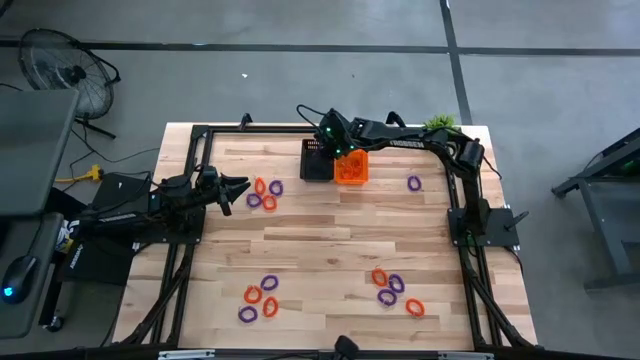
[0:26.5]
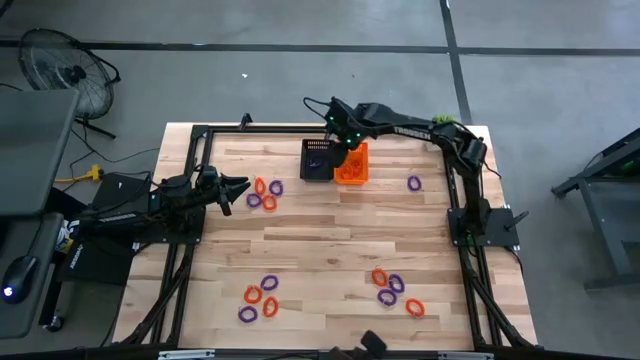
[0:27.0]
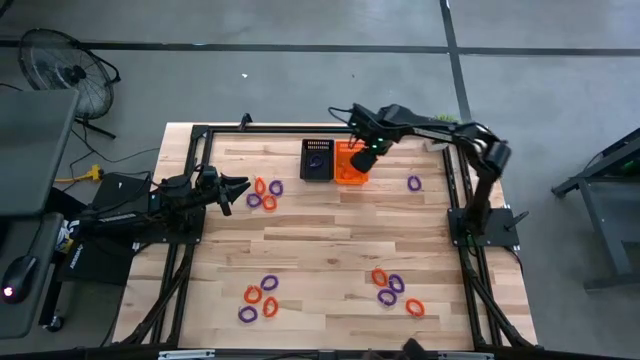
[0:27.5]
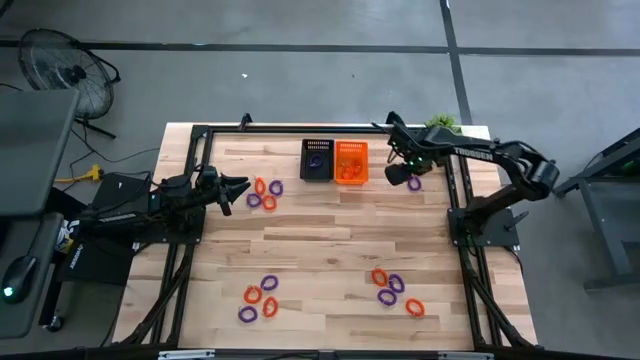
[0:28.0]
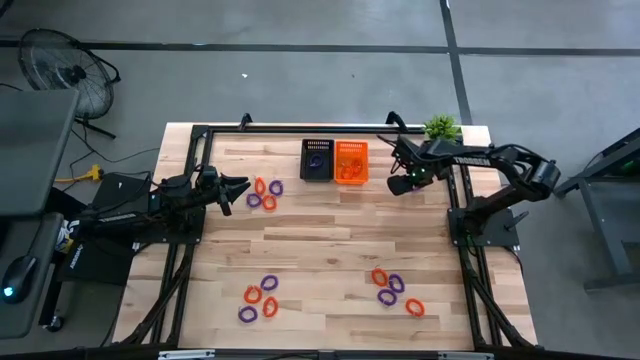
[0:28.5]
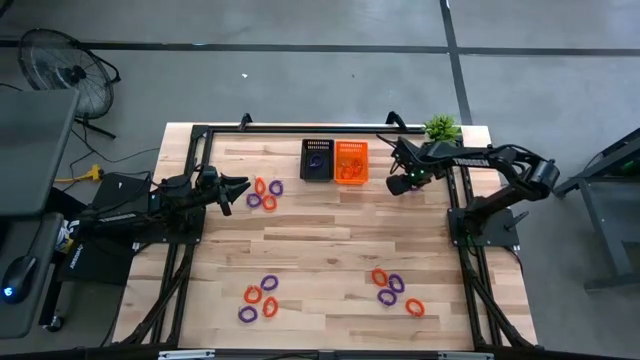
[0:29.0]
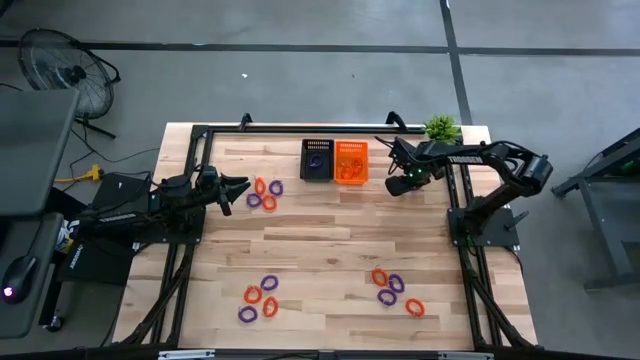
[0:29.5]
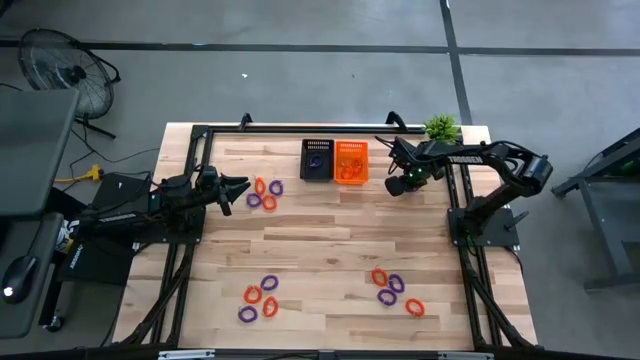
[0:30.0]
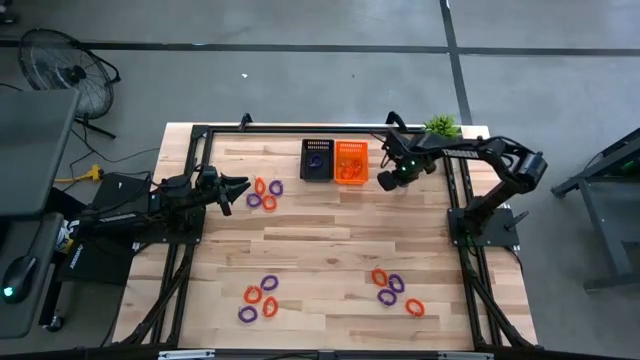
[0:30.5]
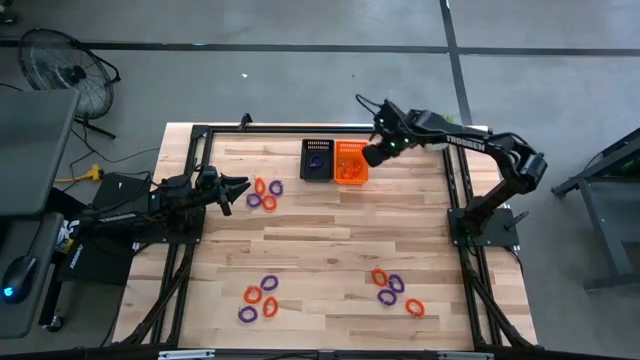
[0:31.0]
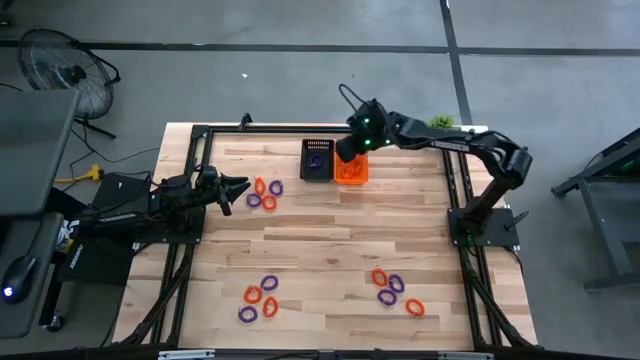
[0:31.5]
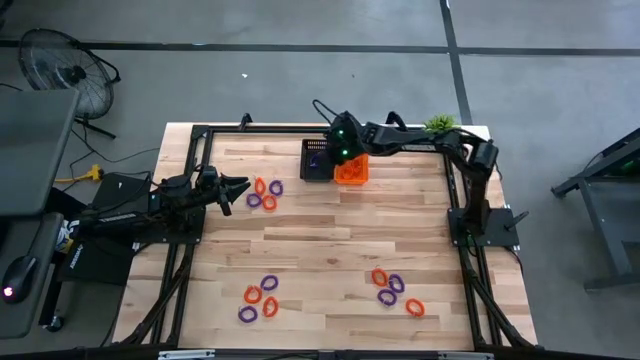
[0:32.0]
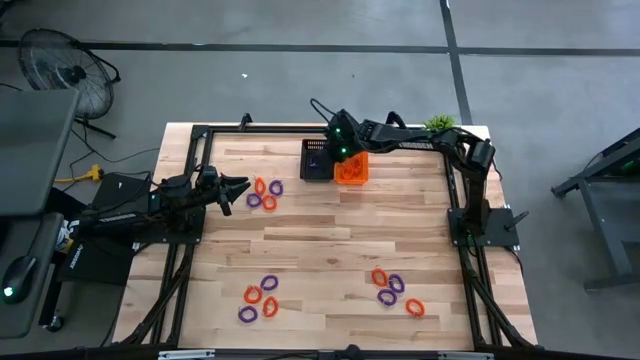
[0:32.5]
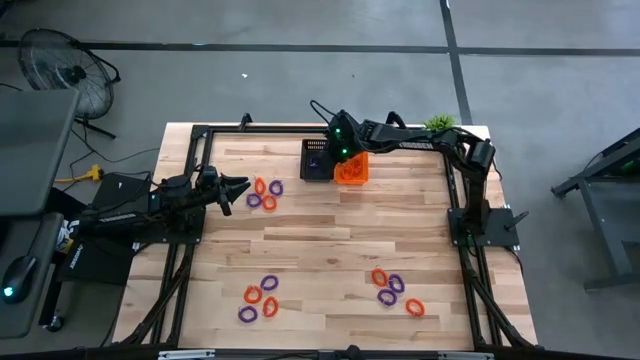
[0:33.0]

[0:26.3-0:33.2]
Task: Sort spring keychains
Put the purple spring keychain in the black bin

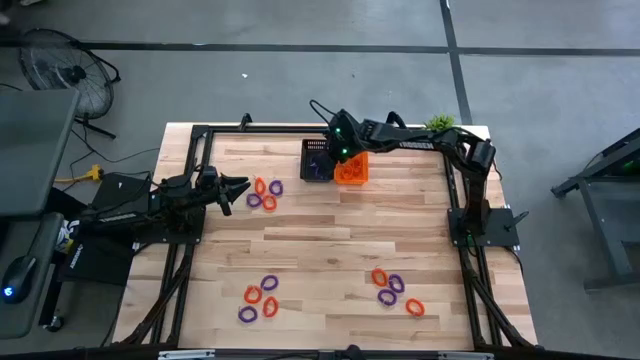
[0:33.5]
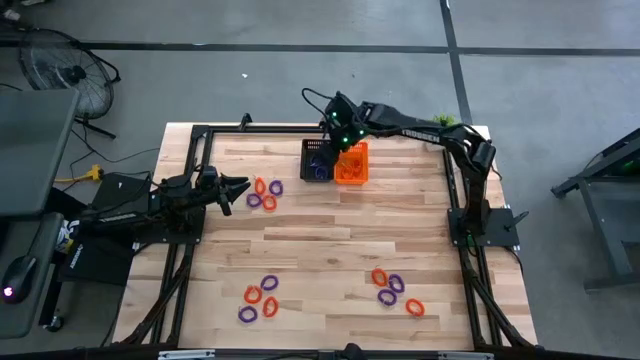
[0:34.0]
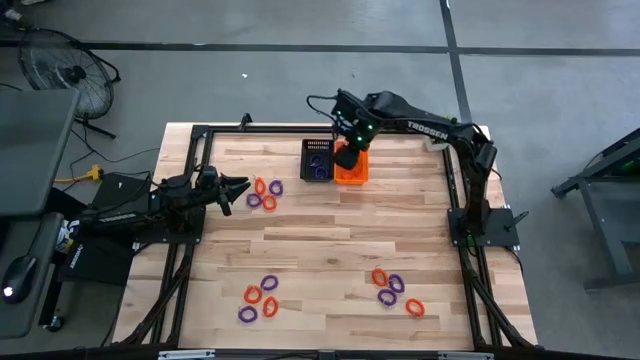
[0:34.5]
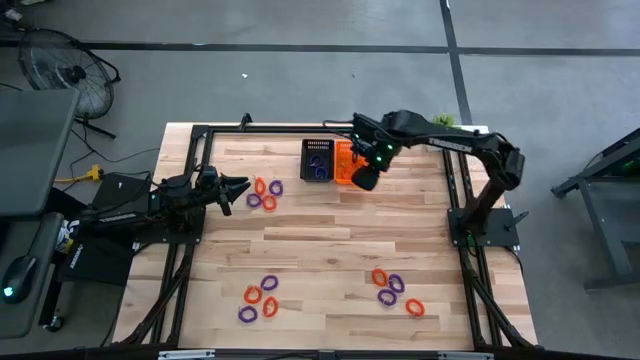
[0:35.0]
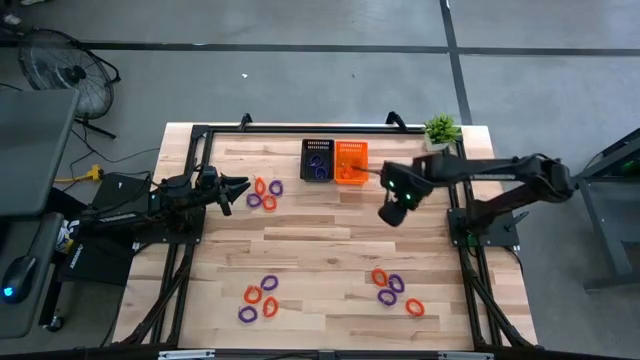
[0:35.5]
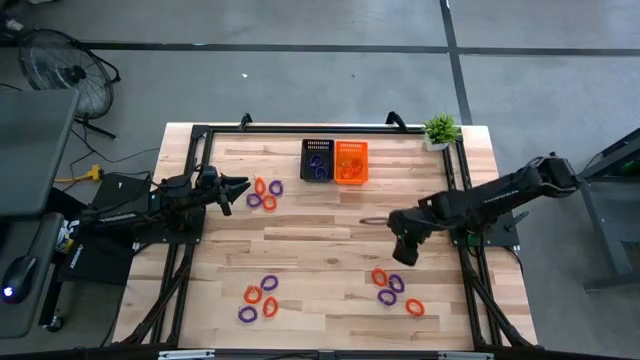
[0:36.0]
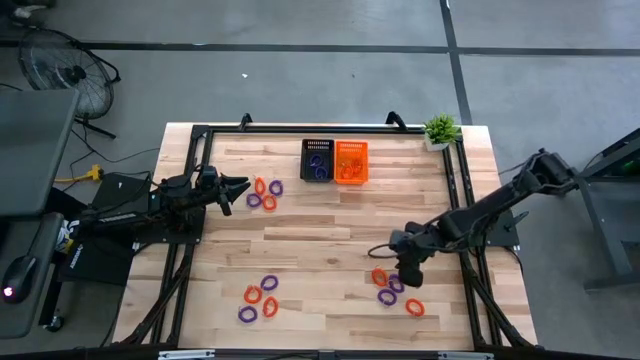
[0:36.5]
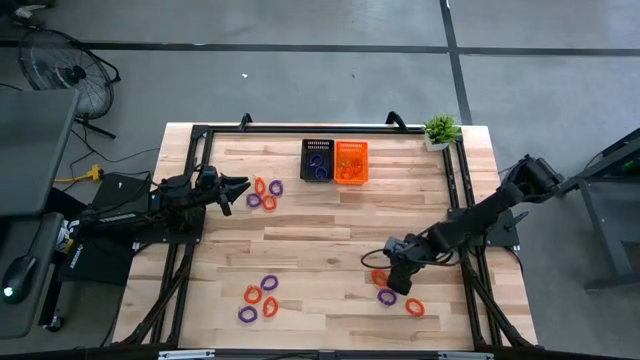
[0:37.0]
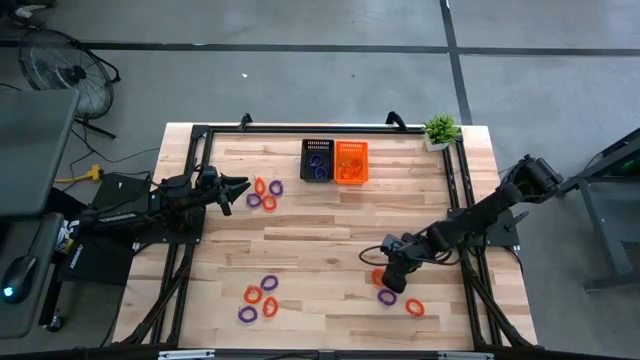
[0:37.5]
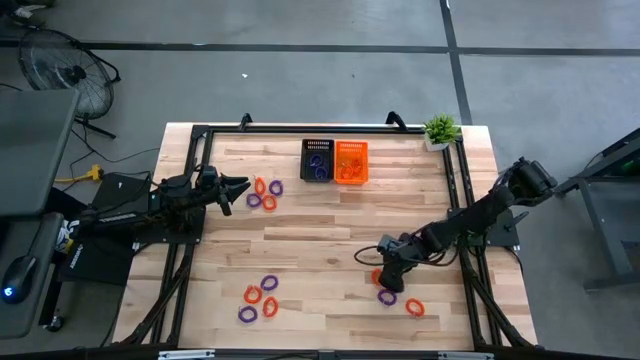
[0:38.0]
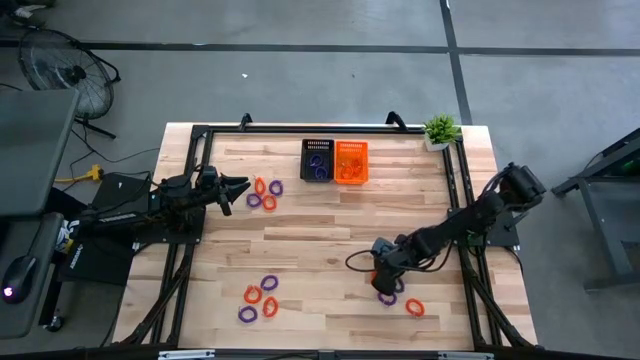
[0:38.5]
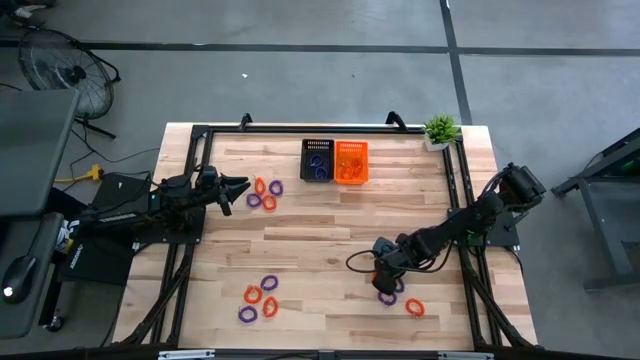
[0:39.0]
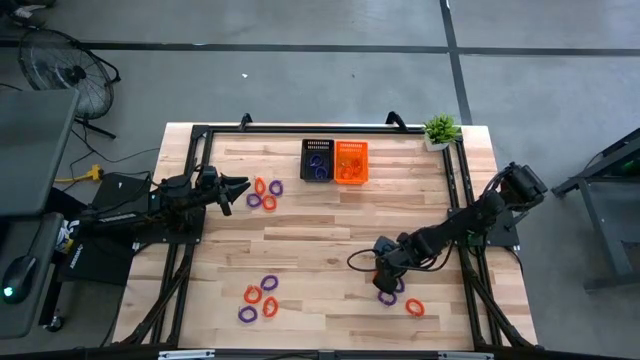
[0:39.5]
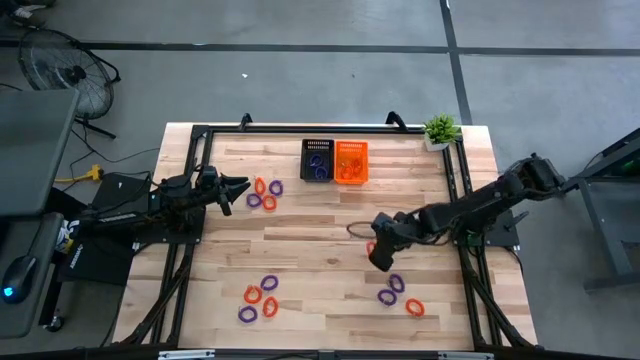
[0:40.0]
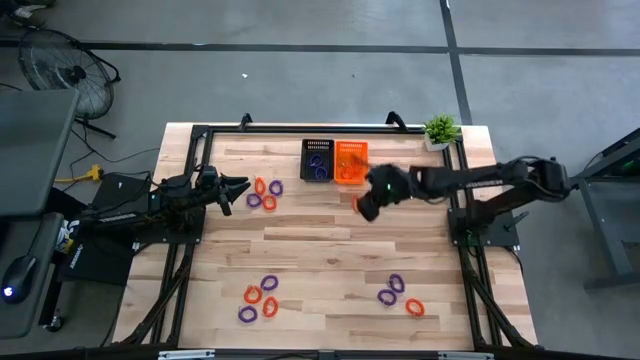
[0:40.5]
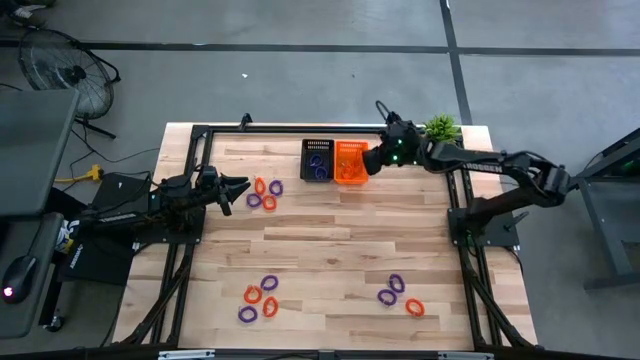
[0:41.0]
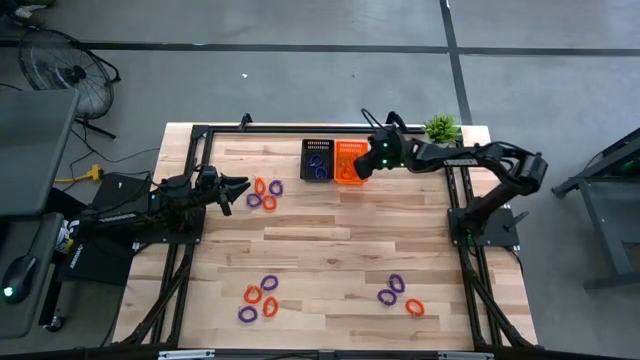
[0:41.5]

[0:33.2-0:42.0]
Put the orange spring keychain in the orange bin

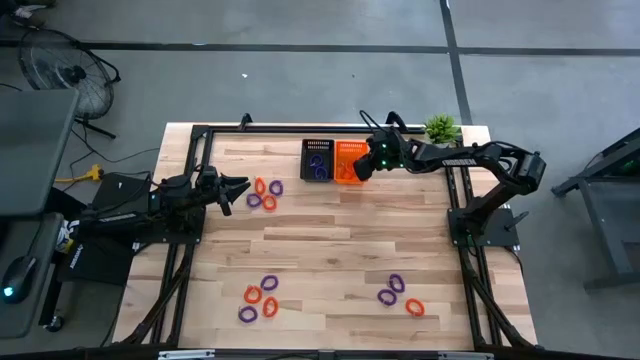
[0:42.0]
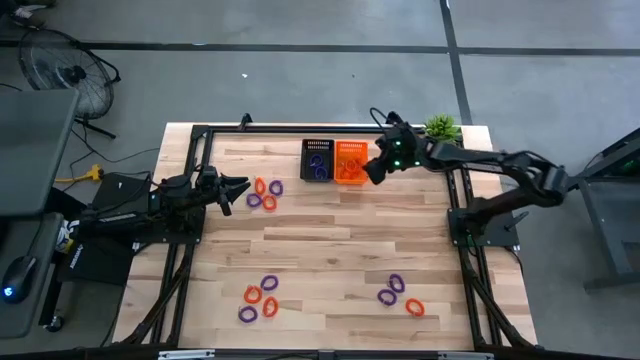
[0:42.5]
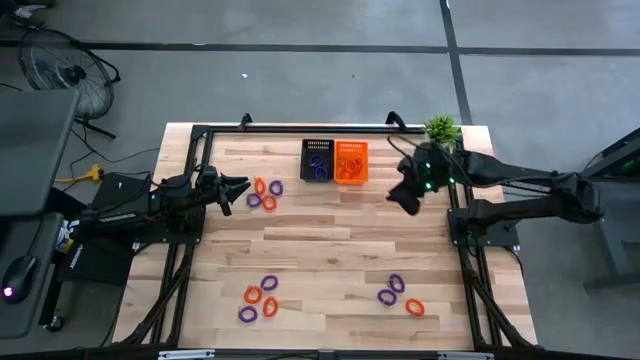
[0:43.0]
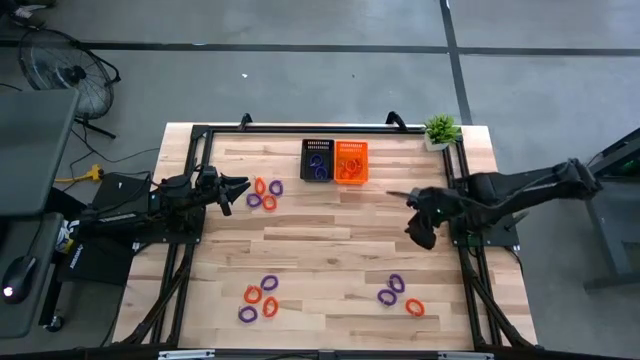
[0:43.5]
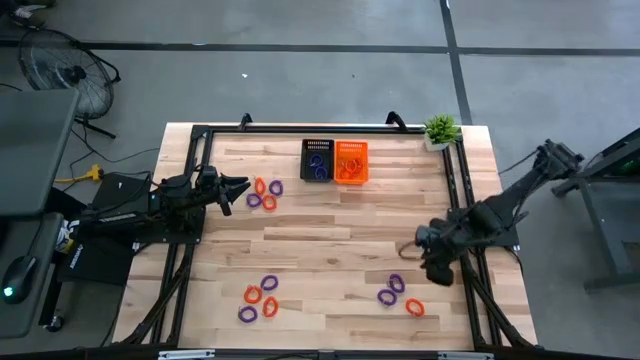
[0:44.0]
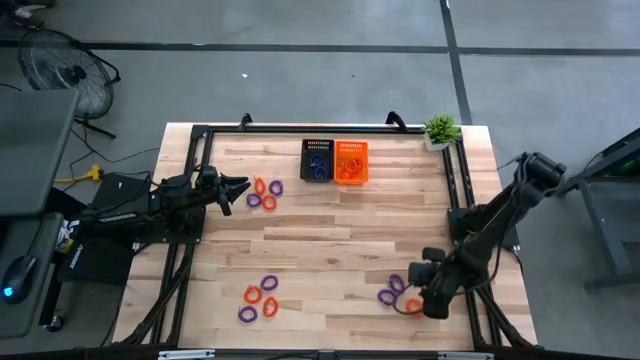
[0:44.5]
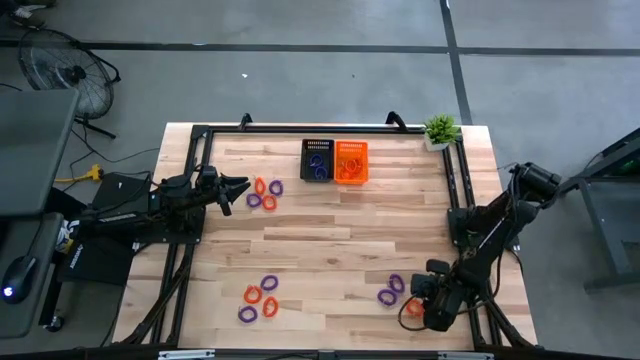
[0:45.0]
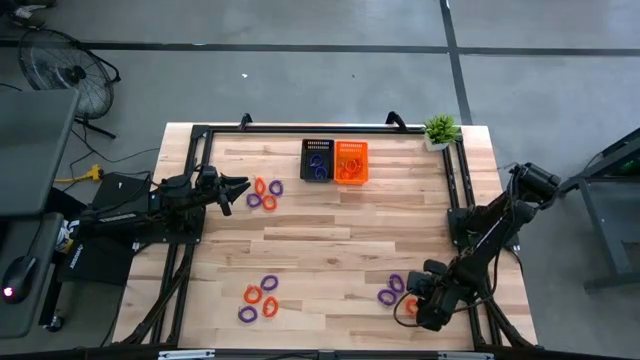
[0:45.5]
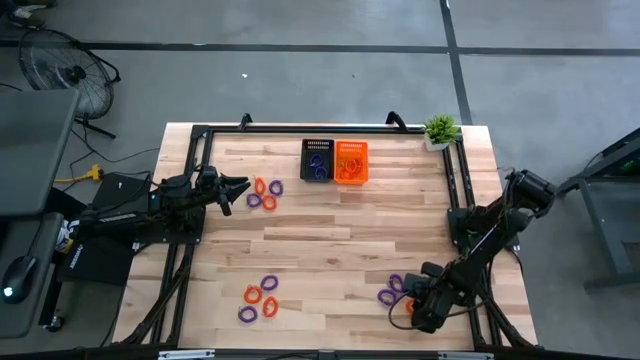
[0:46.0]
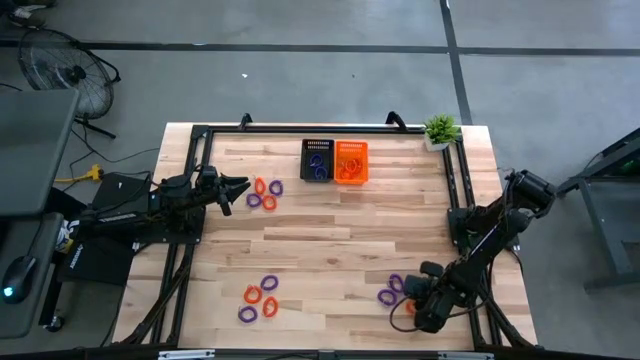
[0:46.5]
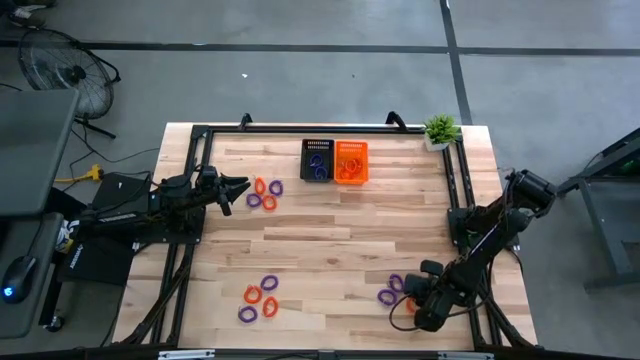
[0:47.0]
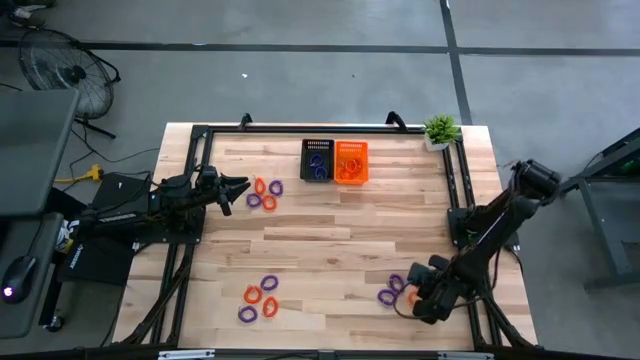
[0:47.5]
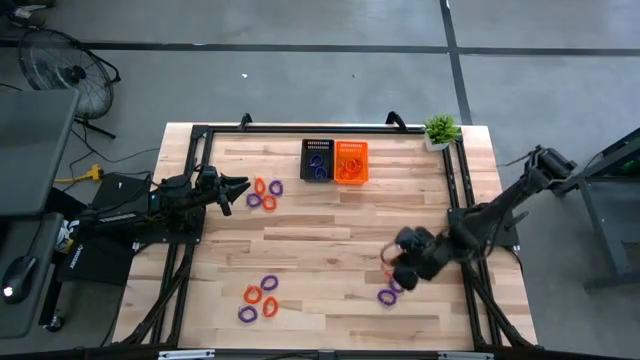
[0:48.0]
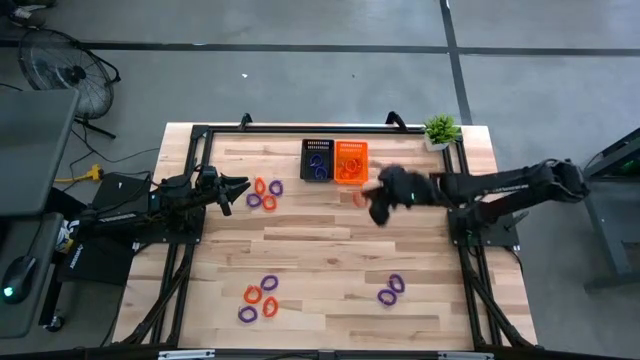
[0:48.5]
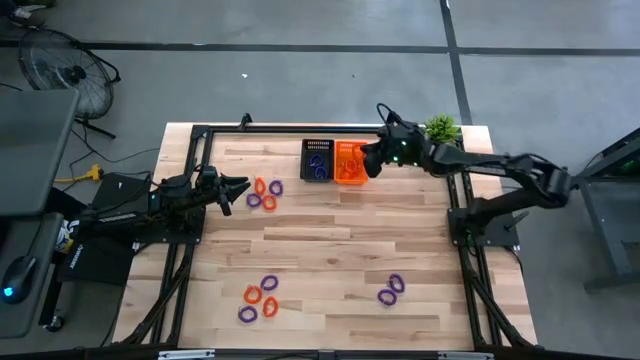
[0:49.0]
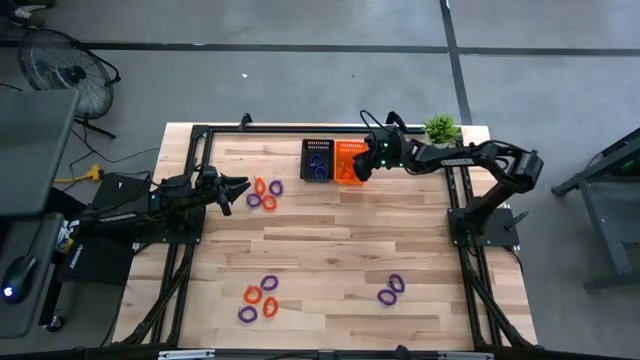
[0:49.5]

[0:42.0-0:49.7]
Put the orange spring keychain in the orange bin
